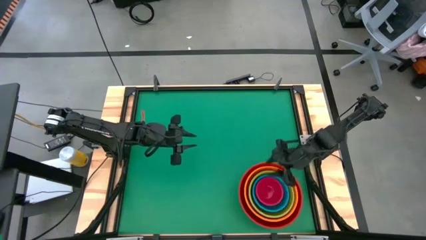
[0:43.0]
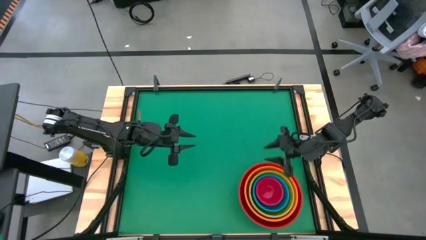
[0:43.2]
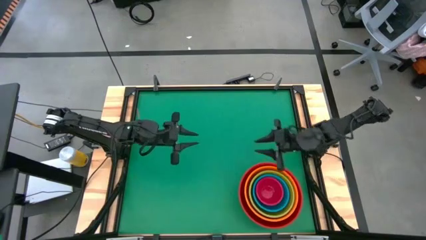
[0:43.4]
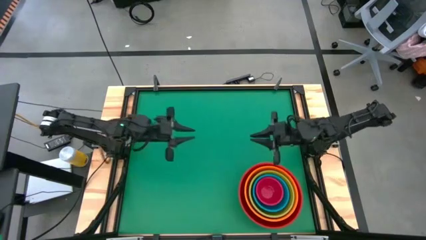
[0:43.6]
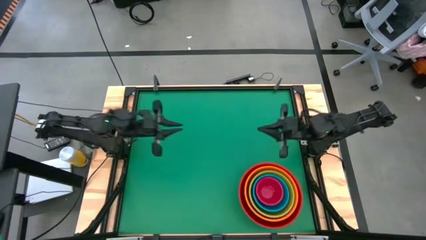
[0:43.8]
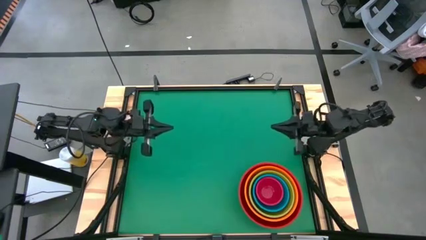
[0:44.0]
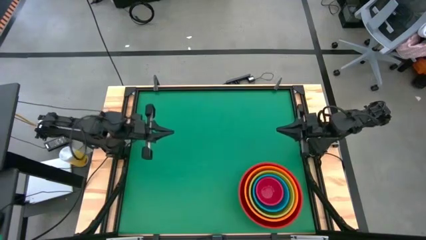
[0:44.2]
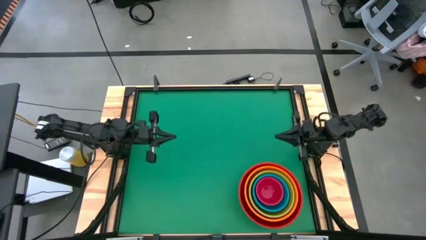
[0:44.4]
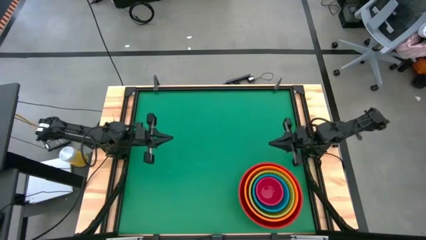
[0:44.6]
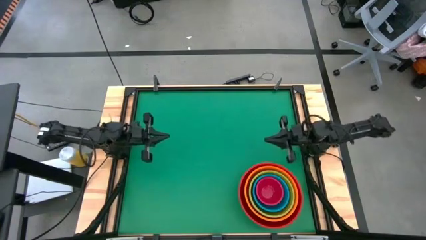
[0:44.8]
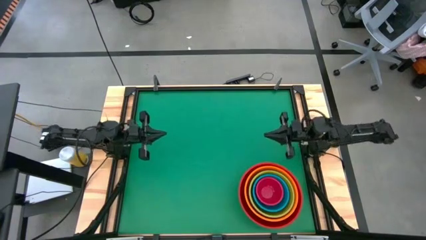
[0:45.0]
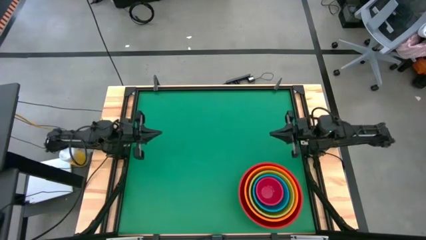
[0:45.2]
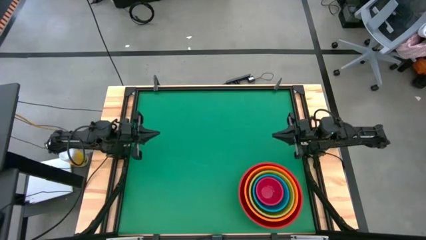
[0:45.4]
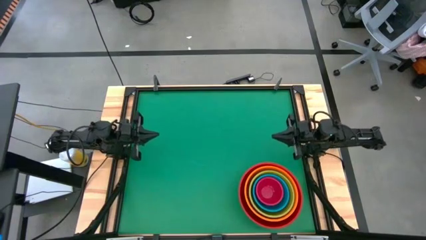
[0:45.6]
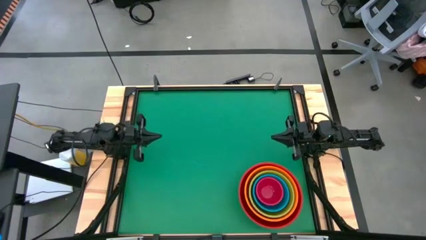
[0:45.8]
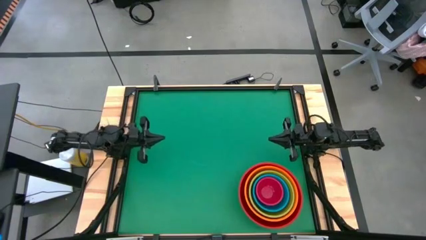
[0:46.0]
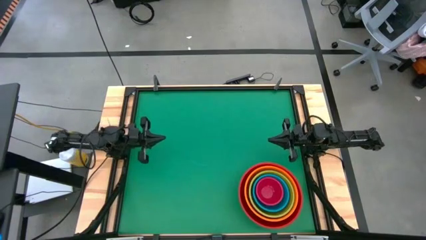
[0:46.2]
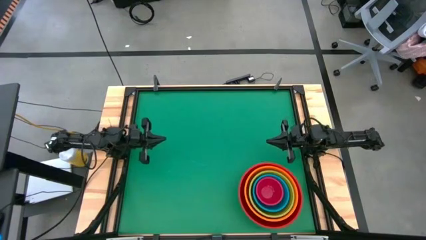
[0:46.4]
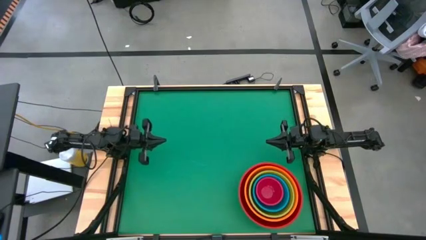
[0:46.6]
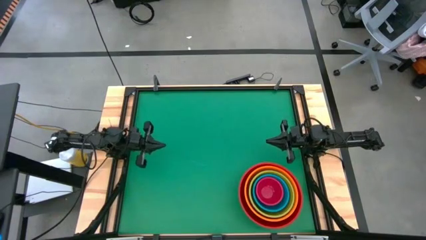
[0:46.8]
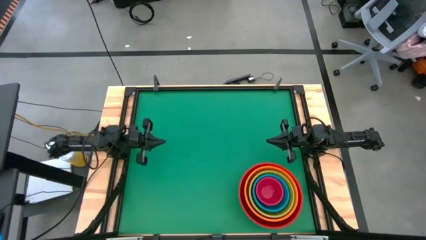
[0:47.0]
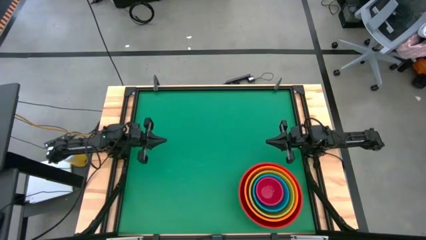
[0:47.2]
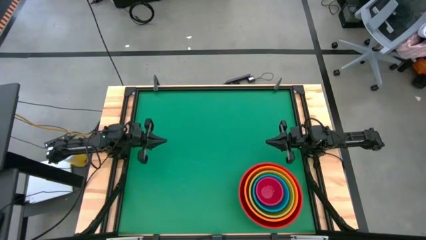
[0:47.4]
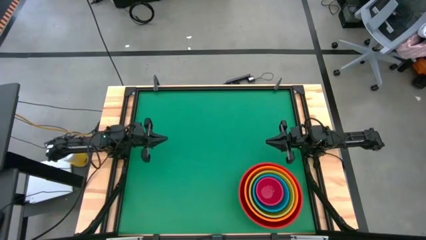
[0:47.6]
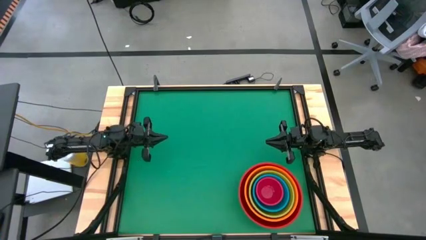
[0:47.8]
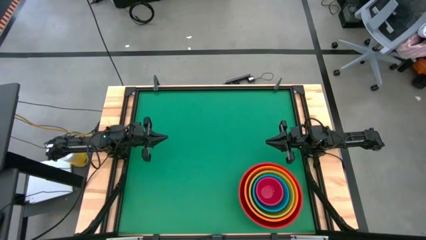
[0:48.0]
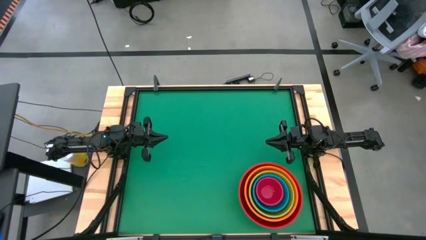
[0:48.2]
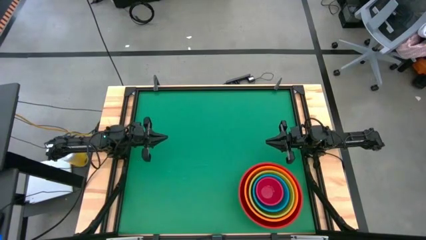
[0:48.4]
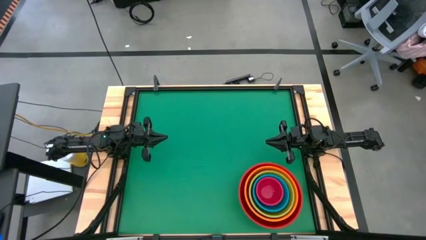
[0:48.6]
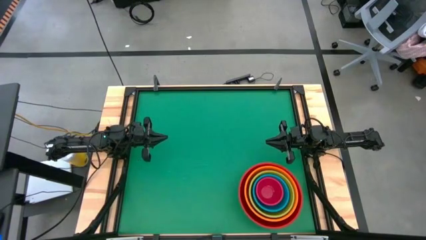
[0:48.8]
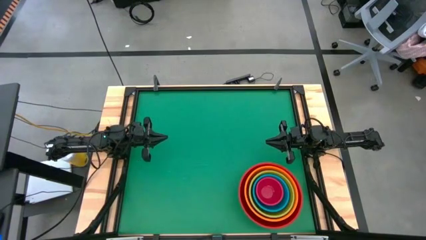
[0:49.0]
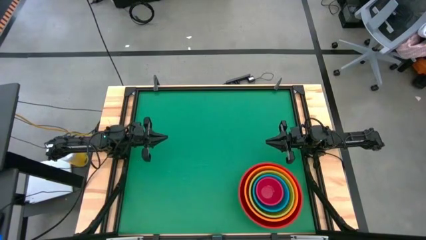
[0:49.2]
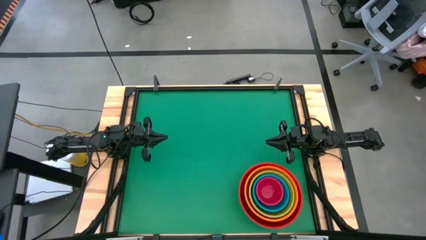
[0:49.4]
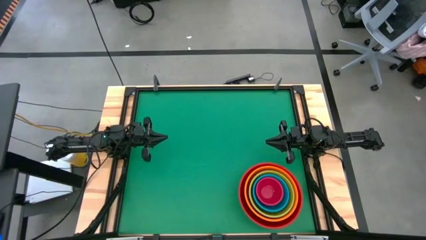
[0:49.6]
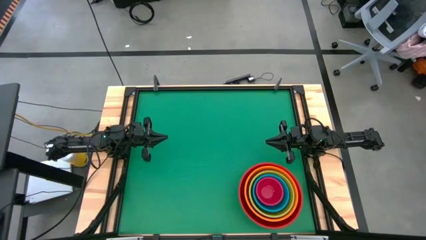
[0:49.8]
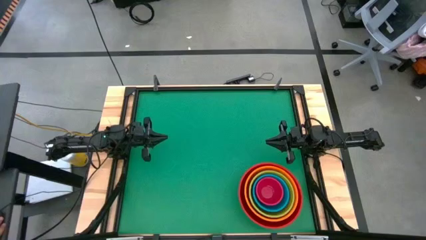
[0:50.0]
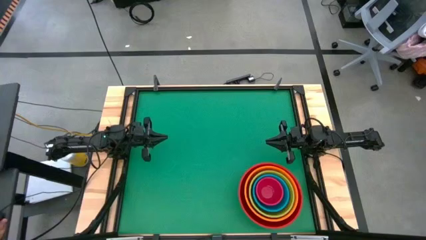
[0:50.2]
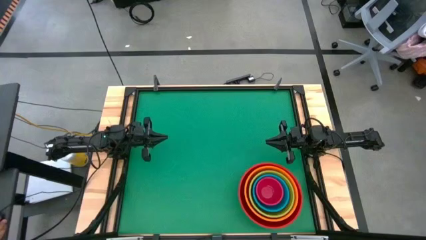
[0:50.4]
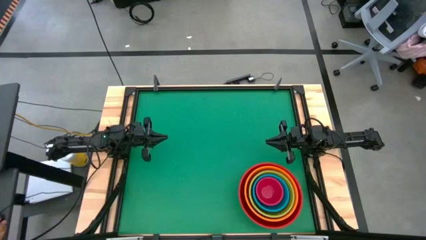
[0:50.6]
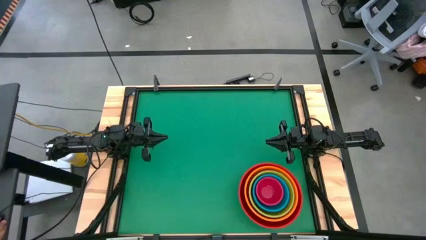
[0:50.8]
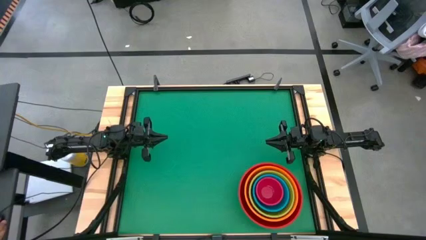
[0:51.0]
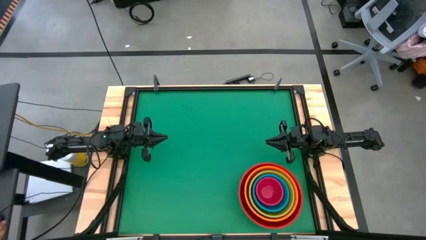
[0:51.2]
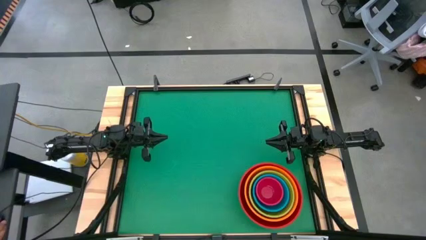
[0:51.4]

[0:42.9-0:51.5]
Return to Home Position

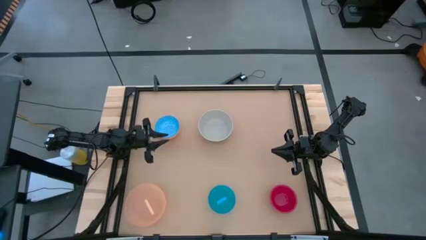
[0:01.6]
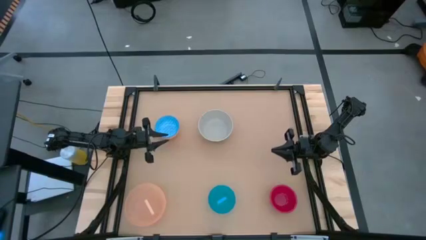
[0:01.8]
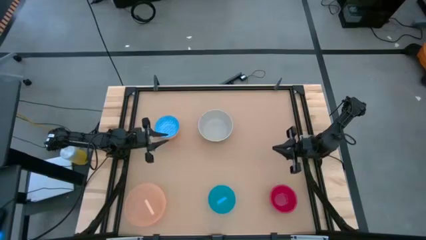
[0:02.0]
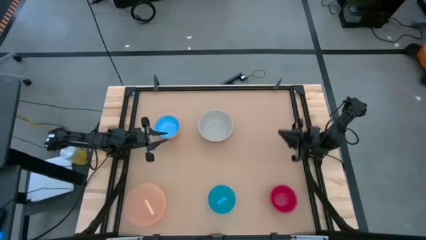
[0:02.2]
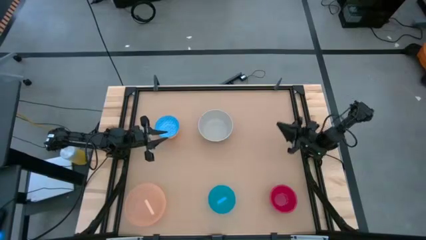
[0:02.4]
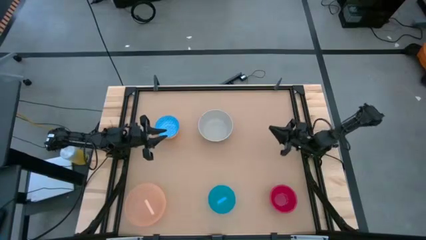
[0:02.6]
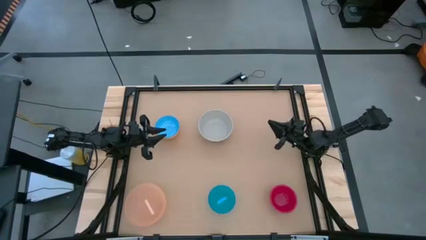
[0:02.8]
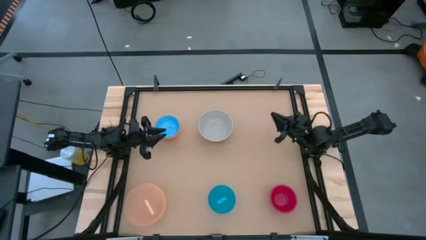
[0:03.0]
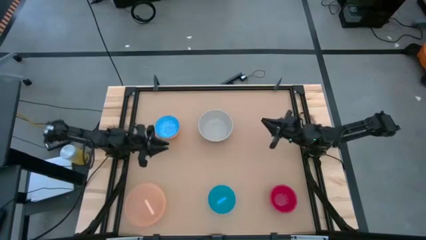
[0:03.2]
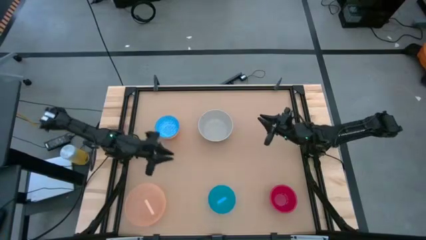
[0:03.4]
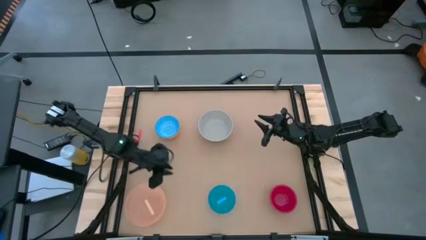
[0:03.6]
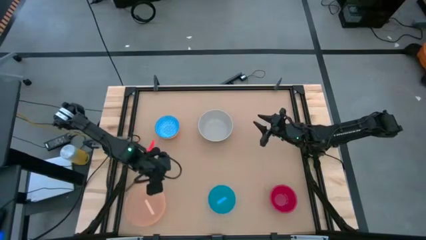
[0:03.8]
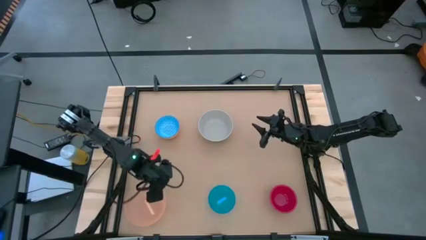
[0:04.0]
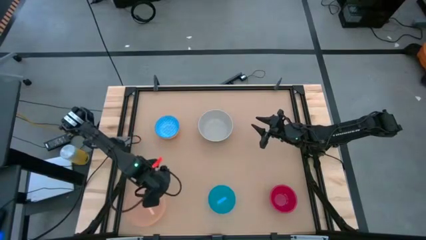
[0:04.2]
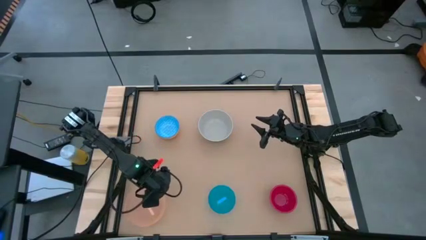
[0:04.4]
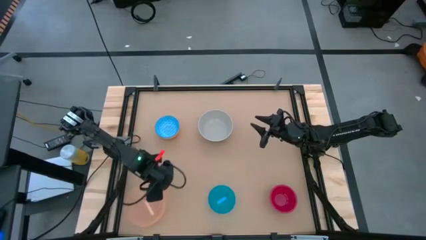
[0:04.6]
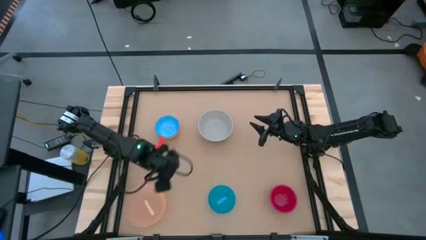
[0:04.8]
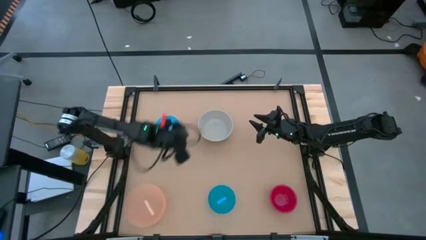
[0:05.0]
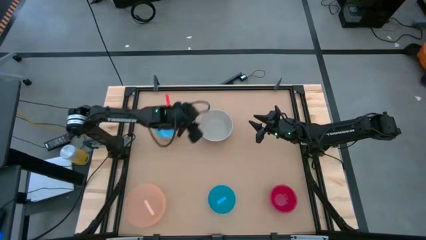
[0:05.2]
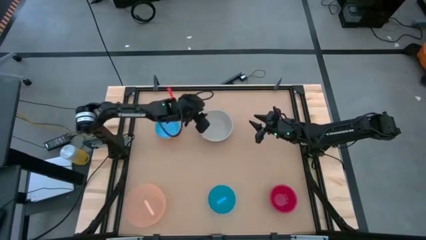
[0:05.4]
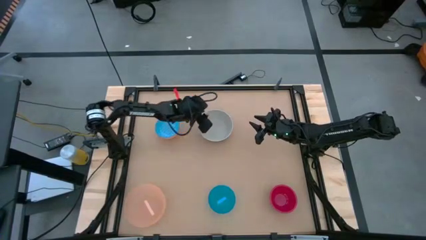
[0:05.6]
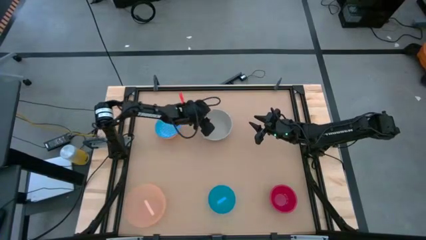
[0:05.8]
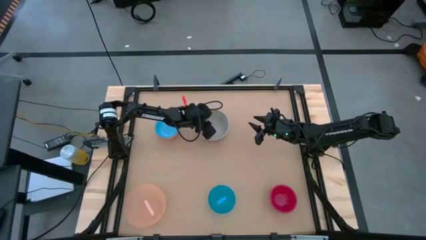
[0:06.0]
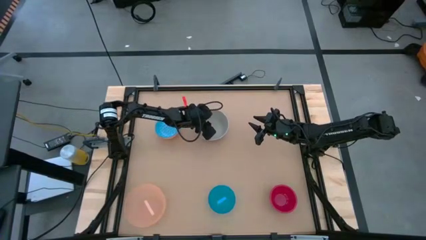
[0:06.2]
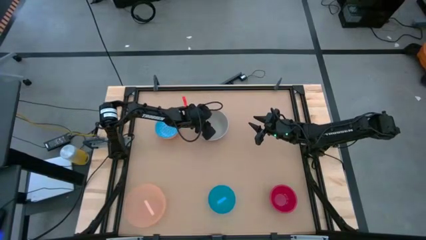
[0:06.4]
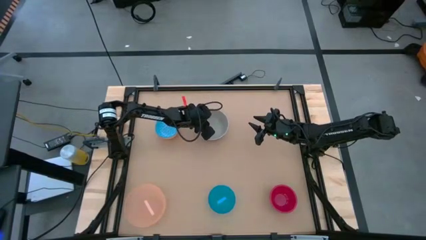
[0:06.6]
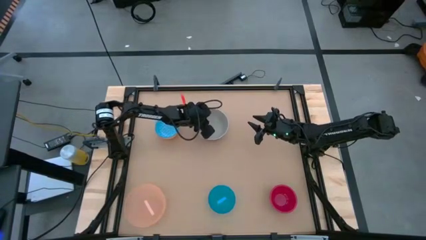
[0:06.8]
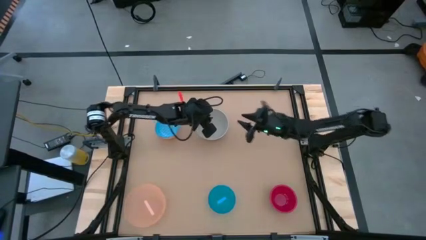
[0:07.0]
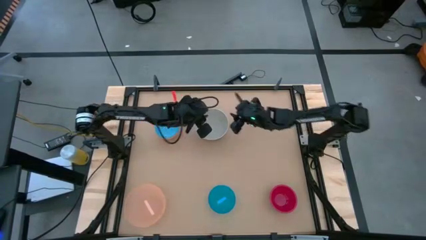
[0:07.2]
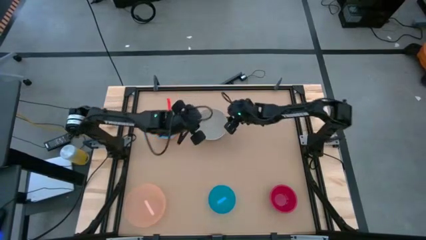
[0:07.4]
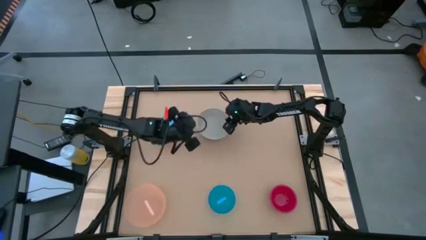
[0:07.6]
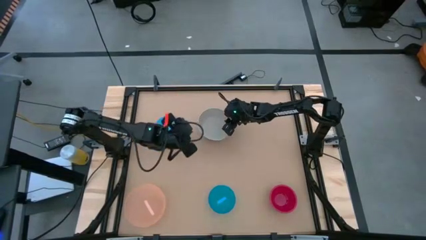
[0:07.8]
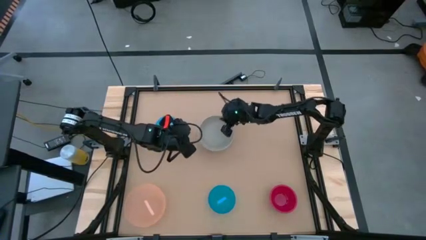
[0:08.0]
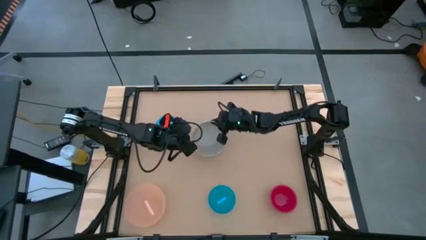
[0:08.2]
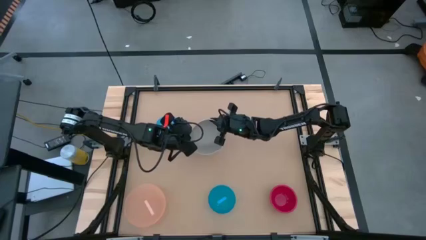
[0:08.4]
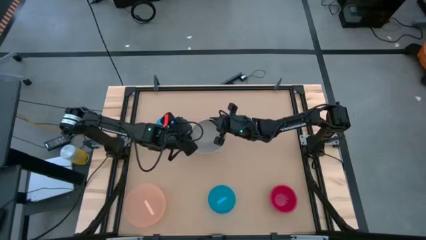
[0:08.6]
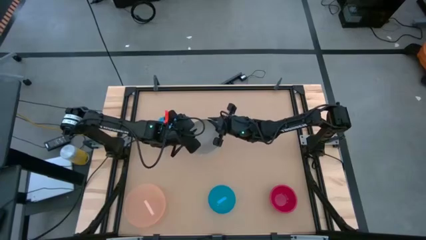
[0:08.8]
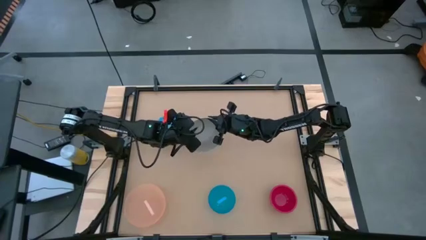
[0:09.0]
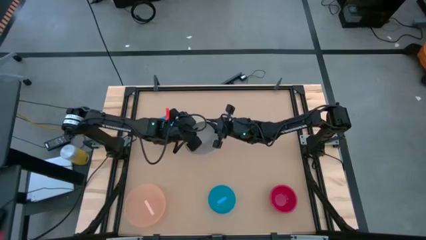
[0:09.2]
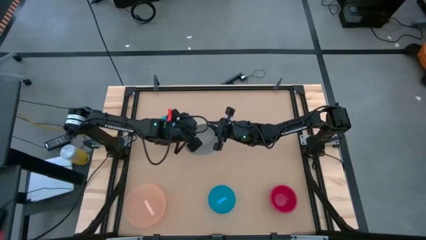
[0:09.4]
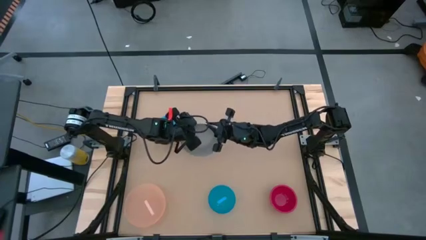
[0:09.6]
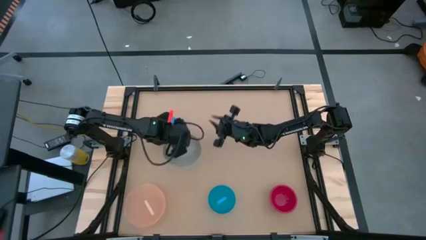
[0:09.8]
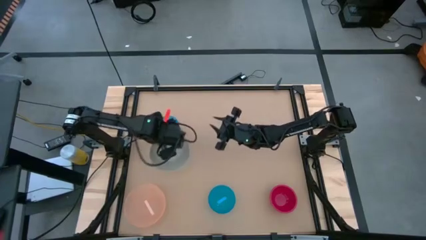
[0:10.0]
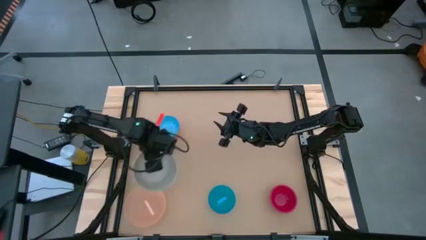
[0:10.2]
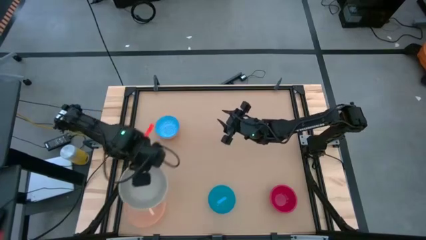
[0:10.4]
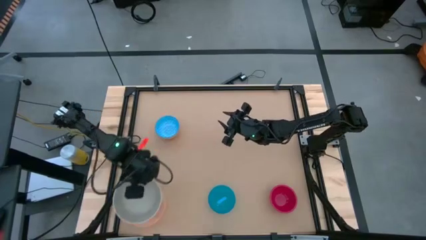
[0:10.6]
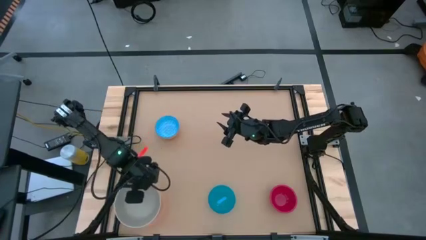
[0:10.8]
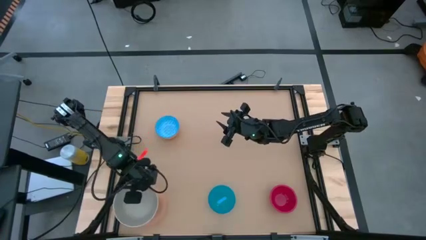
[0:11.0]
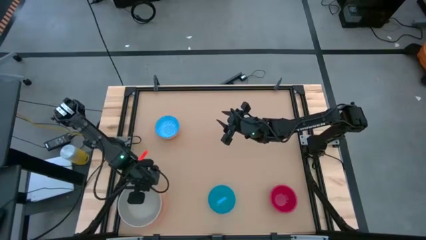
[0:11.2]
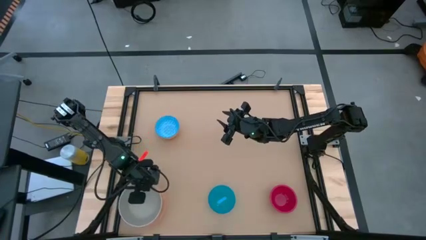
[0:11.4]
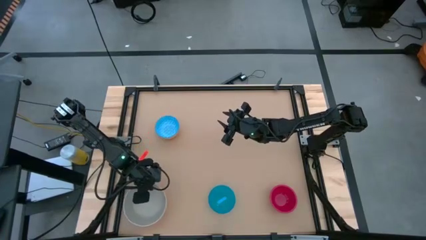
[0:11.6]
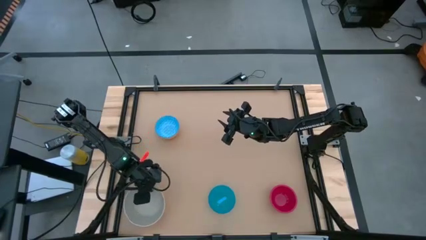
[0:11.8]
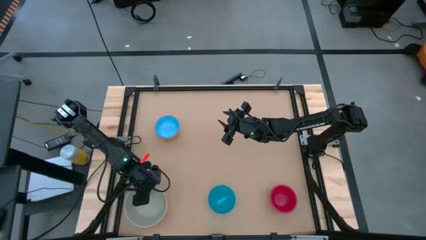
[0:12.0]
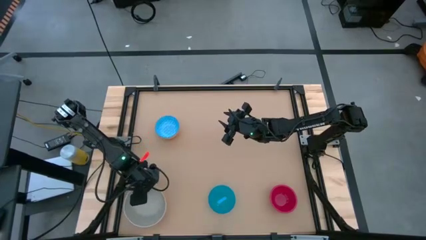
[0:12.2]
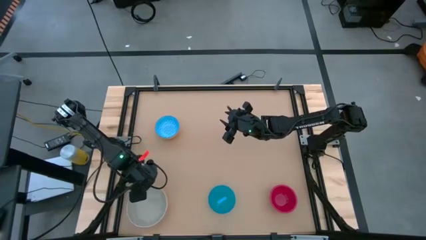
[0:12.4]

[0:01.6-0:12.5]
Stack the gray bowl on top of the orange bowl
